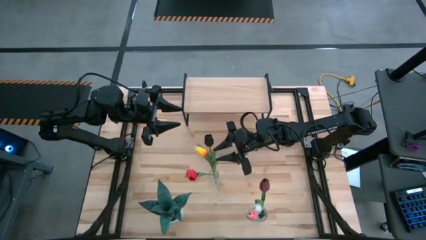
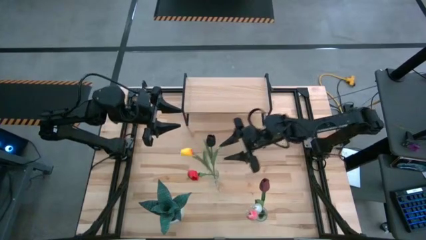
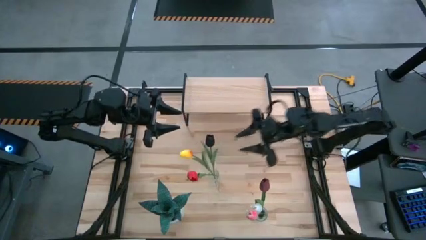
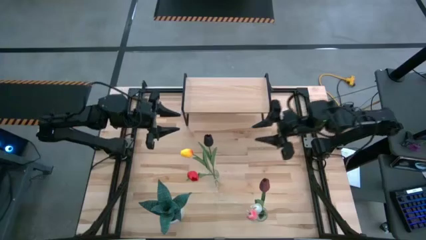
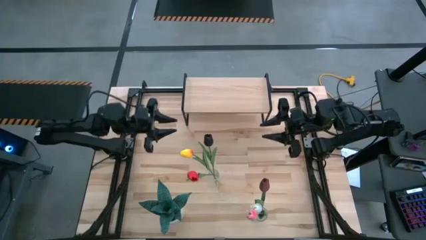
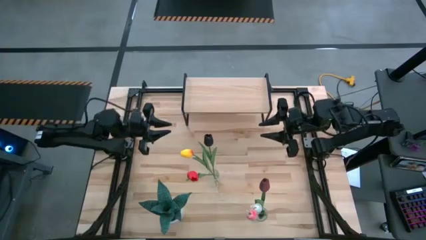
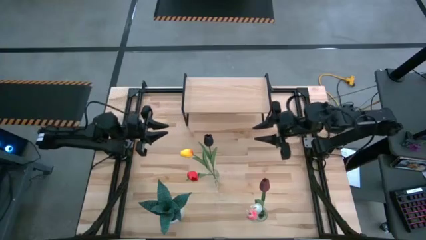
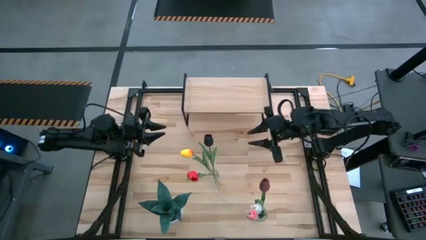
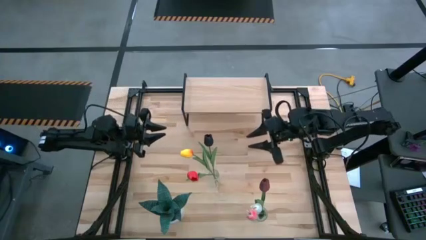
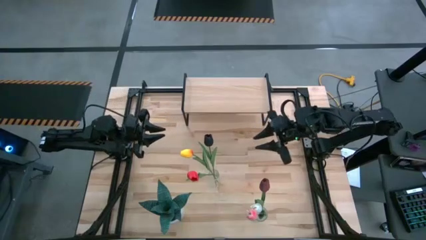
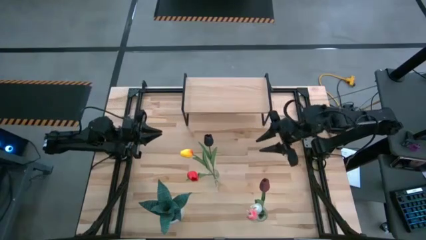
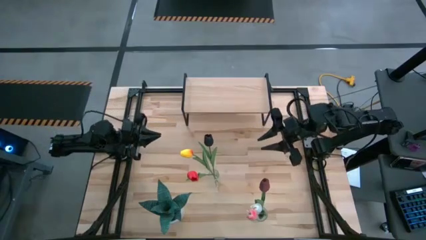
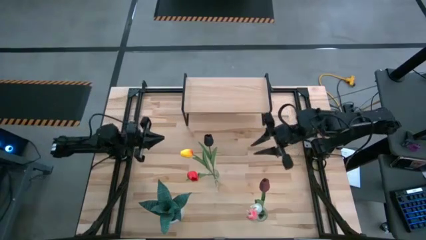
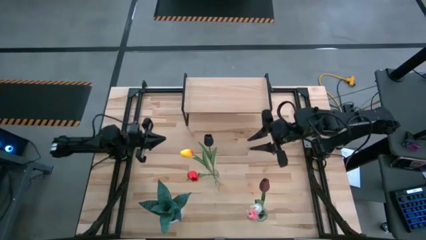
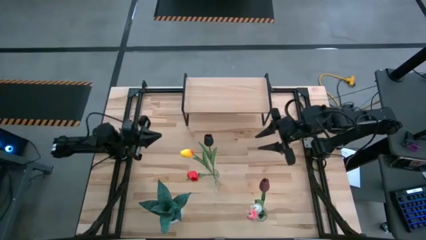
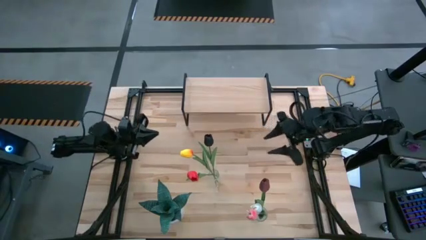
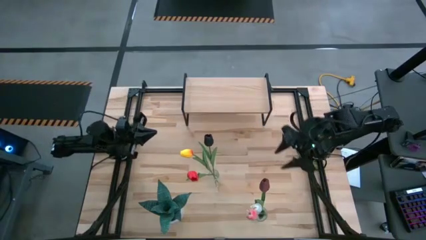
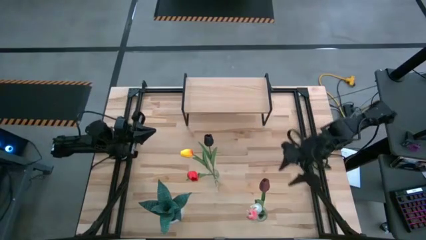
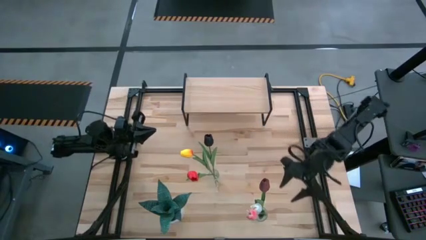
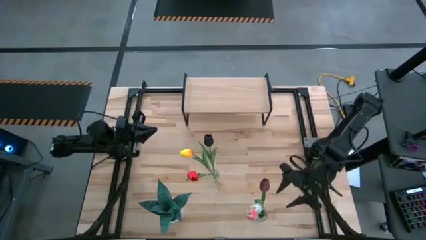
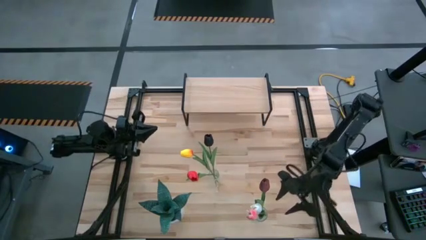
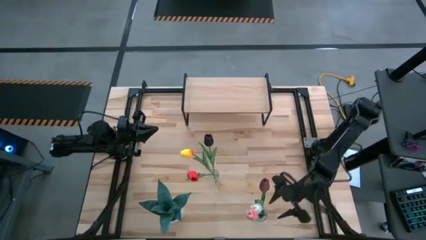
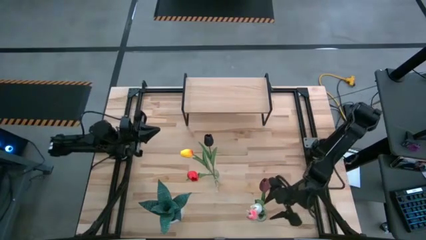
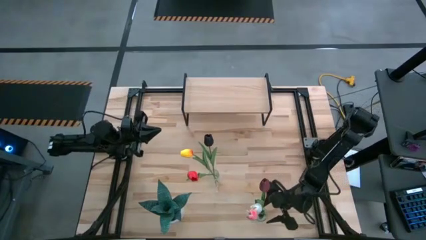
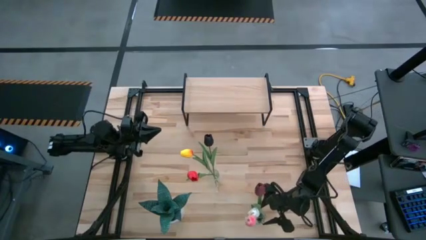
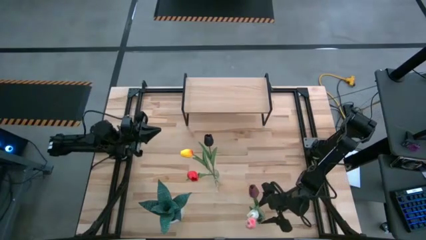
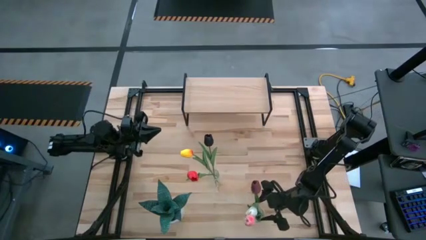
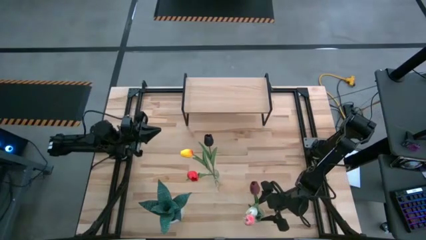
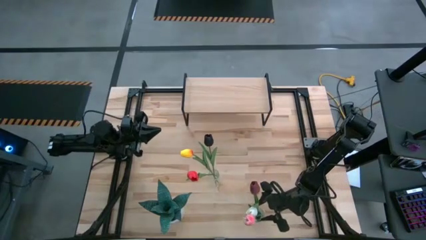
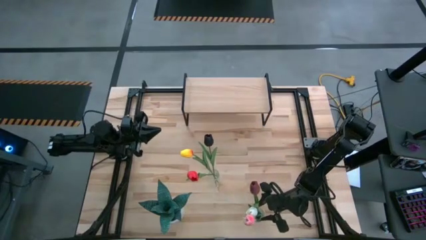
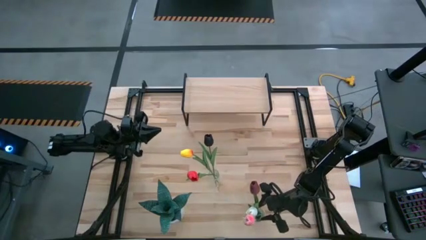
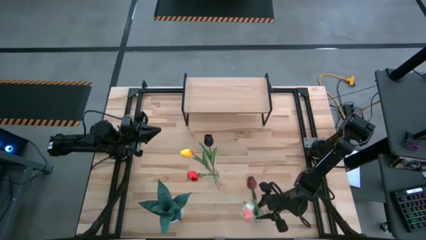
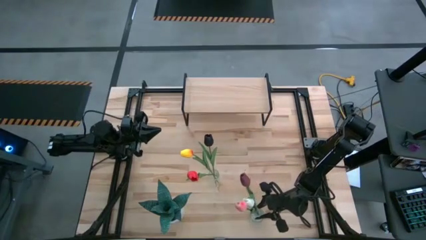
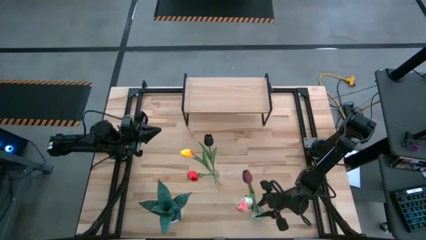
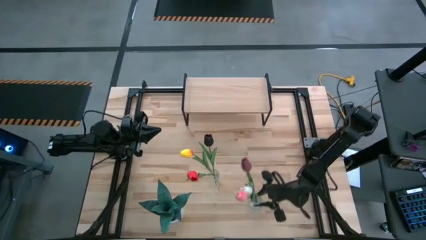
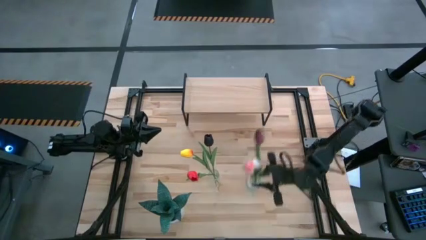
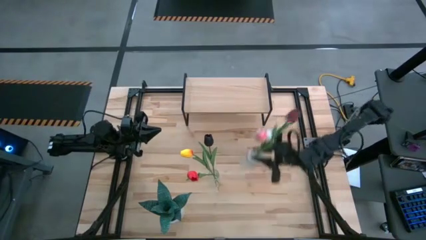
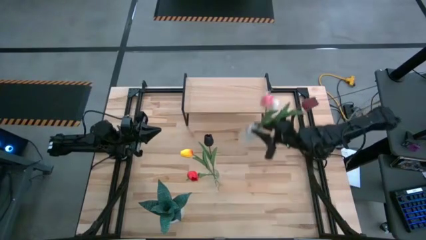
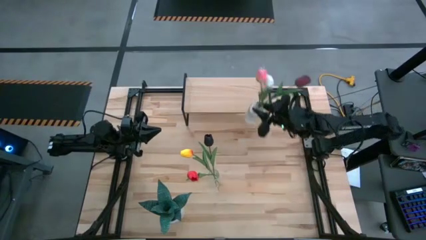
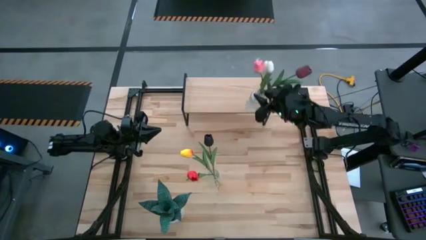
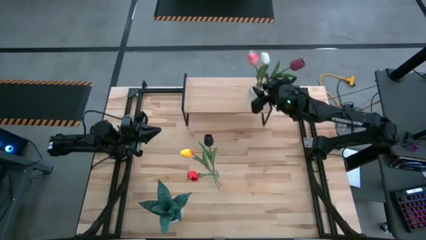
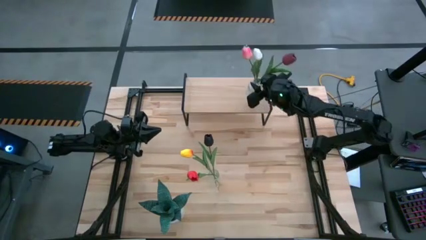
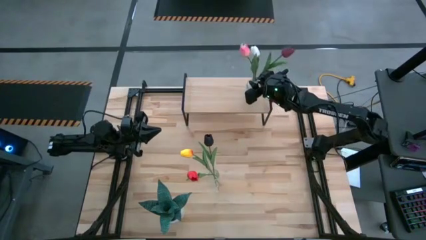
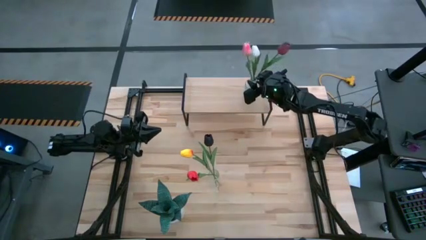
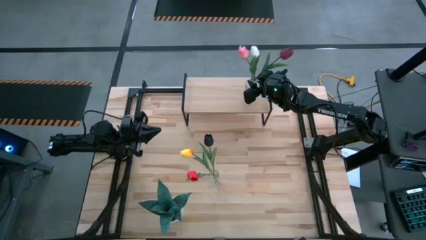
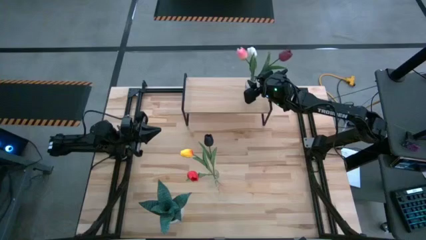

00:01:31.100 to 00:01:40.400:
Task: Pick and place flowers into a vace then onto a shelf
Put the bottom transparent vase with the flowers on the shelf

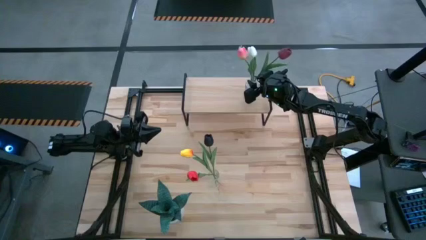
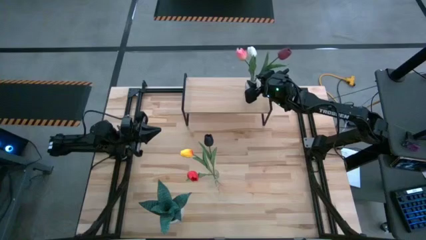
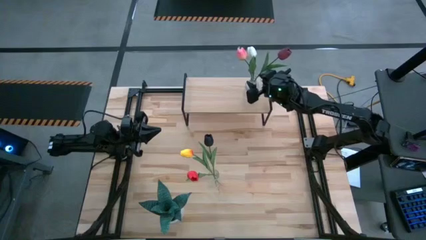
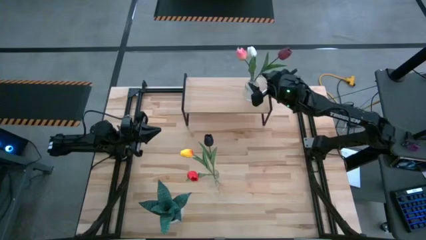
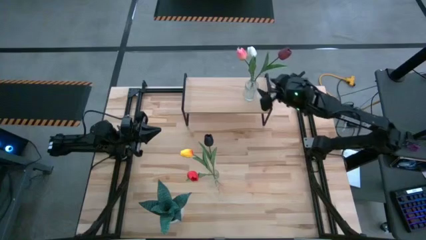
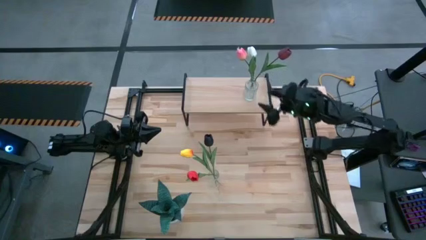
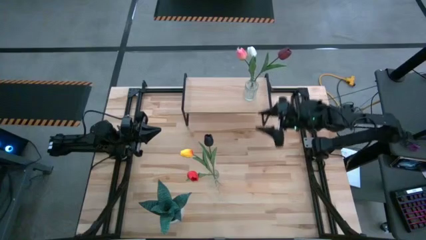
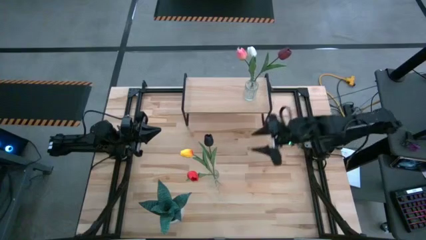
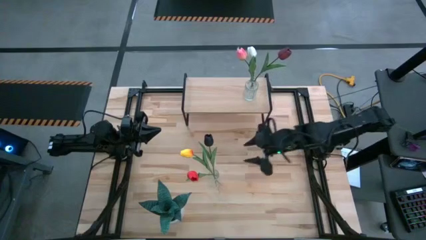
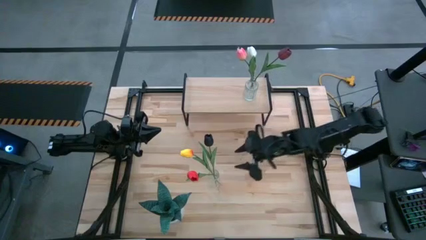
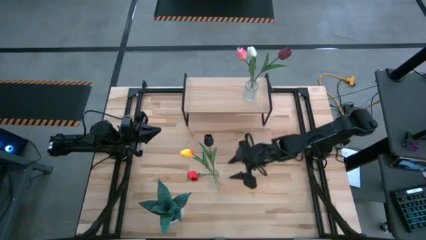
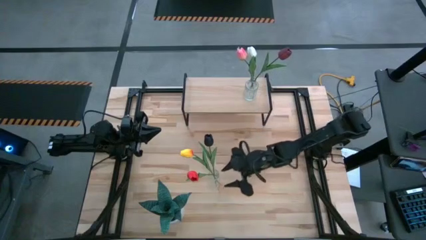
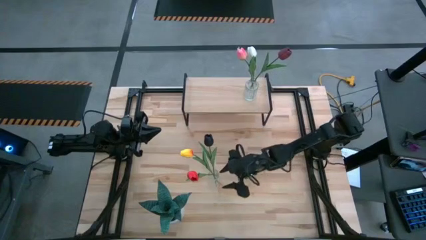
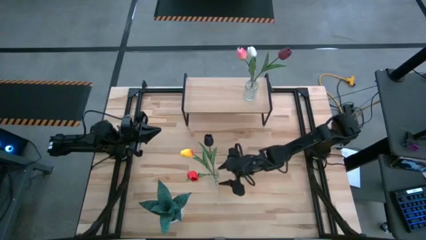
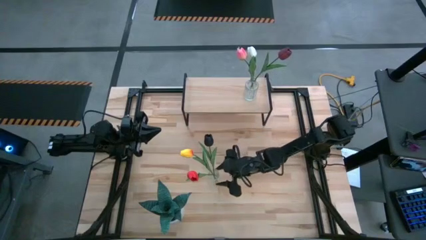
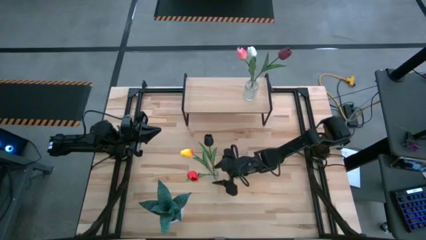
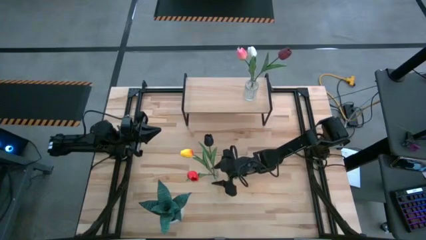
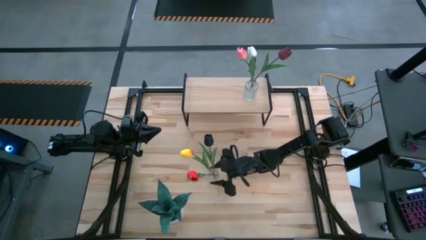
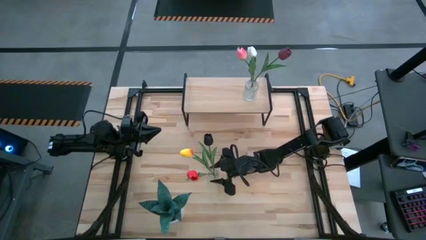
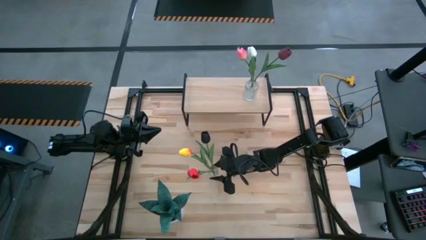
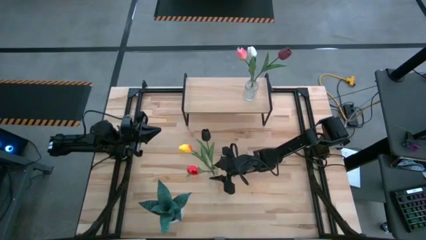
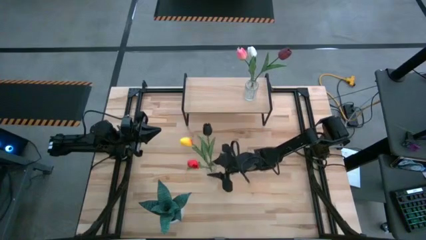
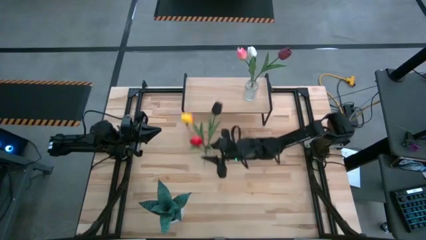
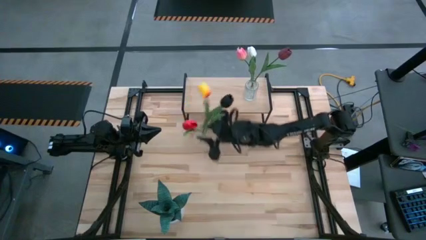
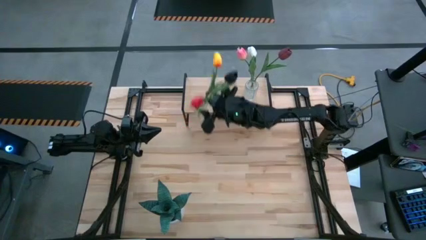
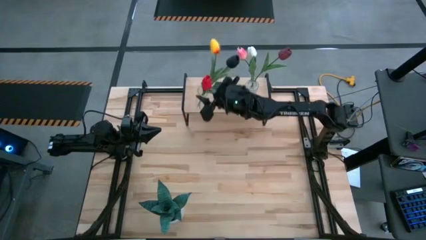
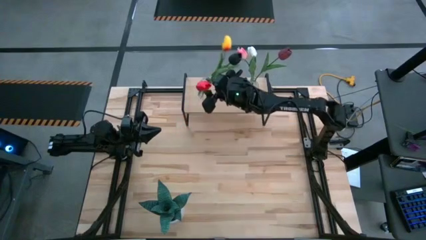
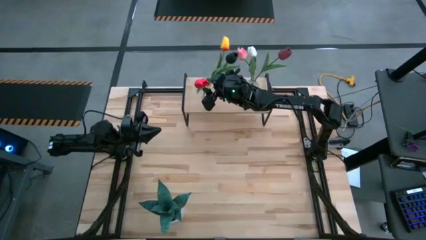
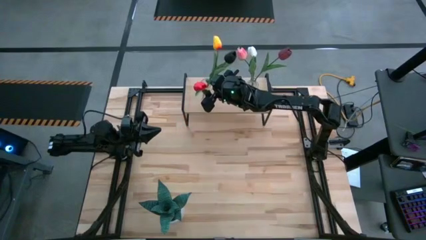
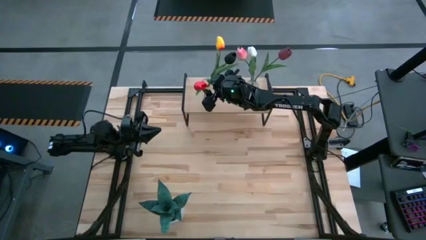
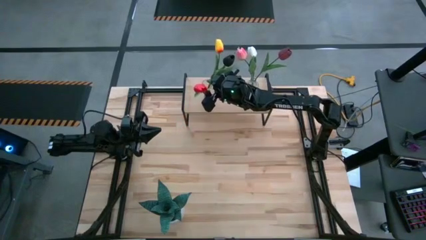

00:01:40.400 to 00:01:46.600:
Put the transparent vase with the flowers on the shelf

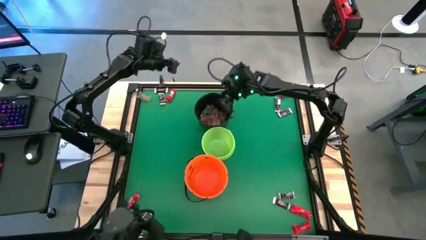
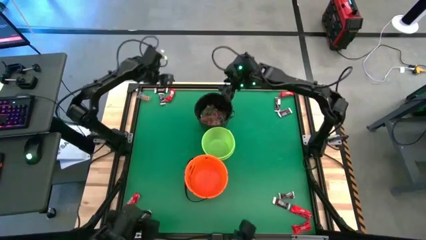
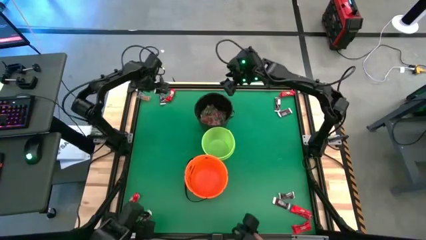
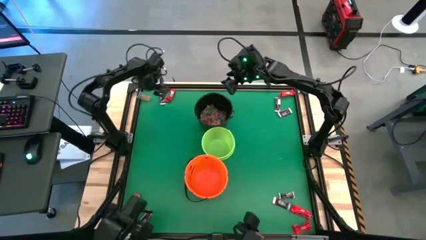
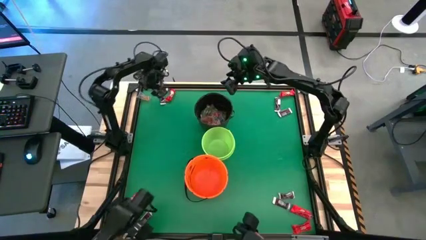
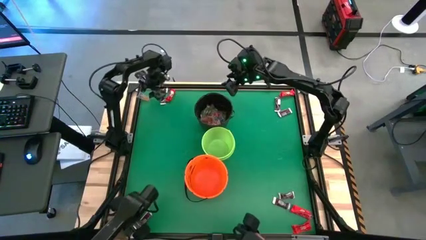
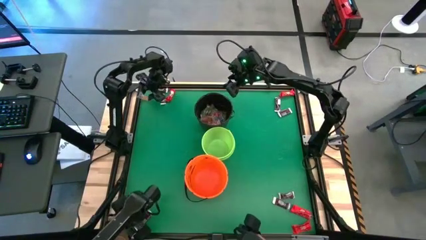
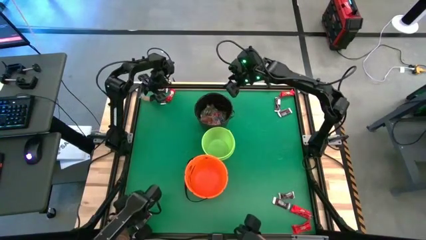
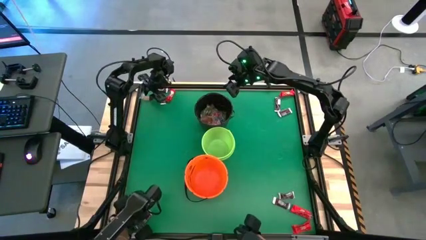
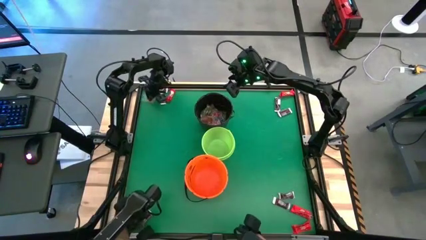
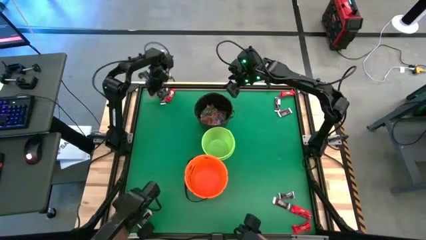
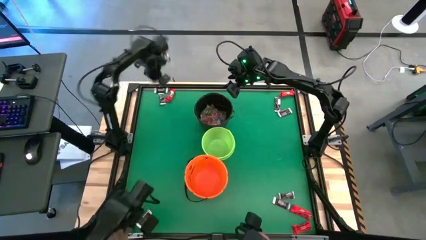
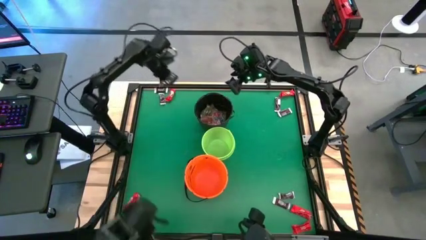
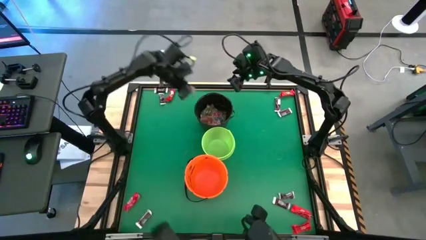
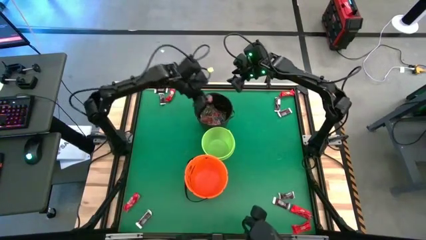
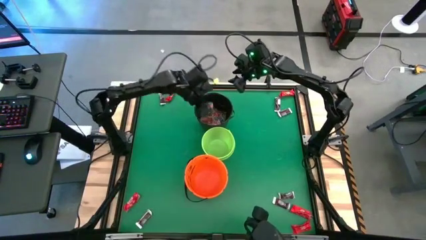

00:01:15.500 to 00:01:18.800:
Task: Sort candy by brand, put in halloween buckets
Put the orange gummy into the black bucket
